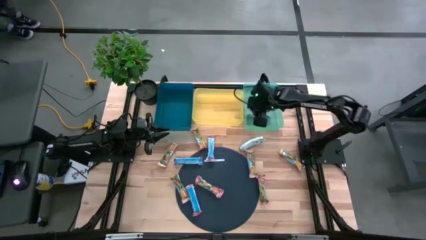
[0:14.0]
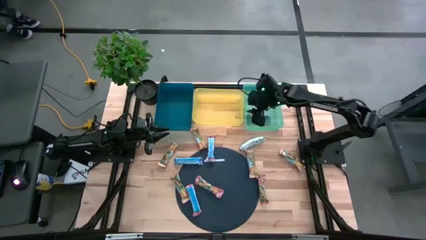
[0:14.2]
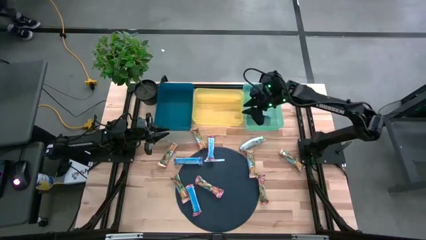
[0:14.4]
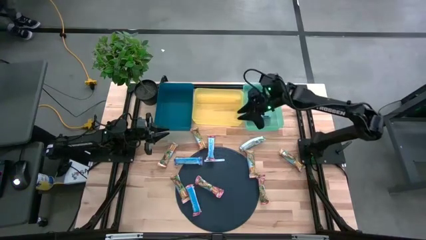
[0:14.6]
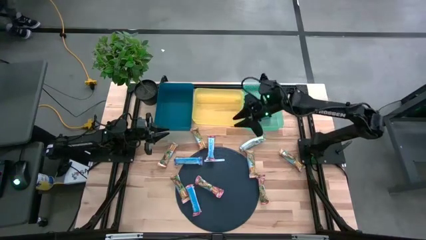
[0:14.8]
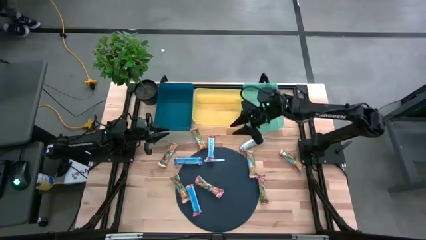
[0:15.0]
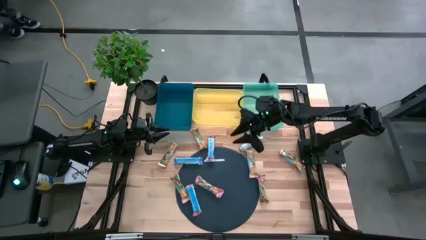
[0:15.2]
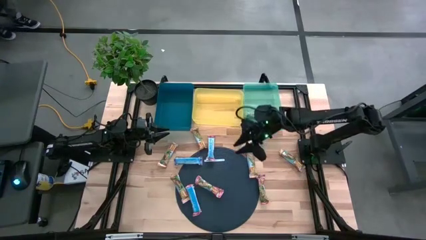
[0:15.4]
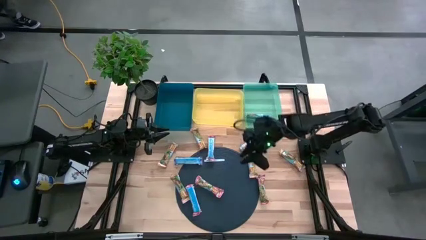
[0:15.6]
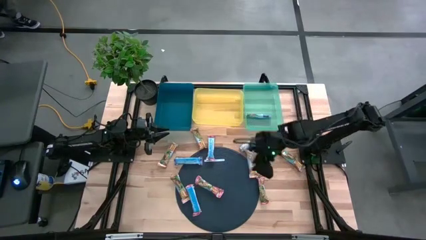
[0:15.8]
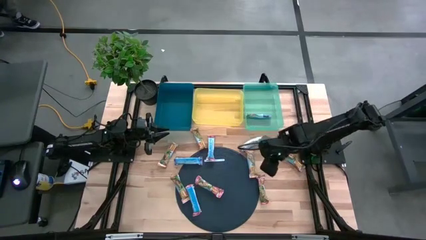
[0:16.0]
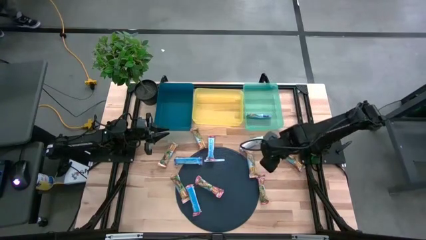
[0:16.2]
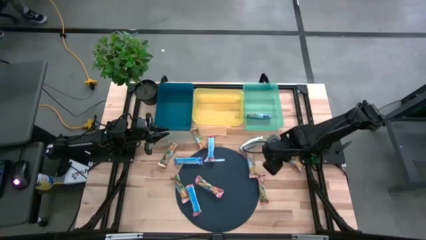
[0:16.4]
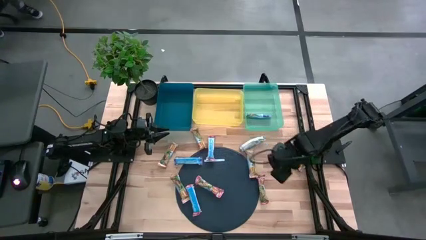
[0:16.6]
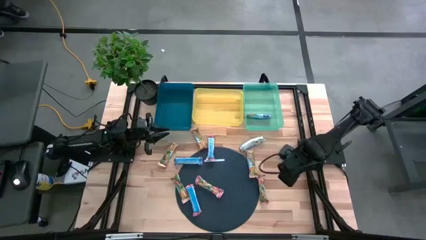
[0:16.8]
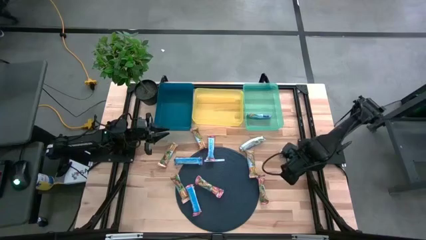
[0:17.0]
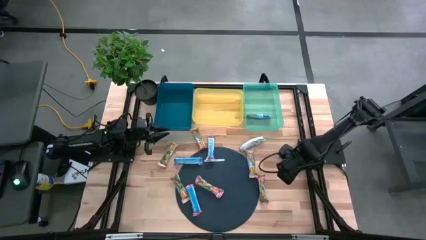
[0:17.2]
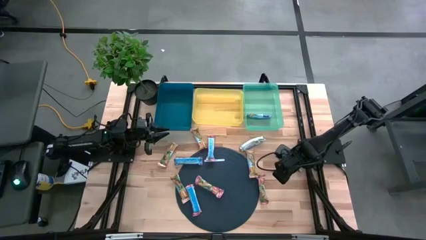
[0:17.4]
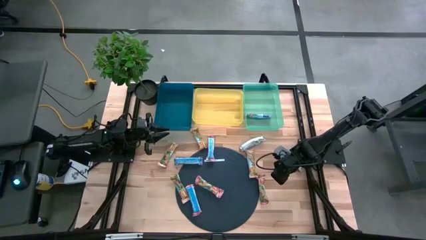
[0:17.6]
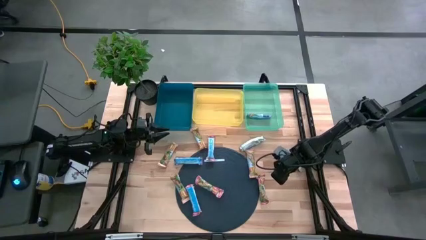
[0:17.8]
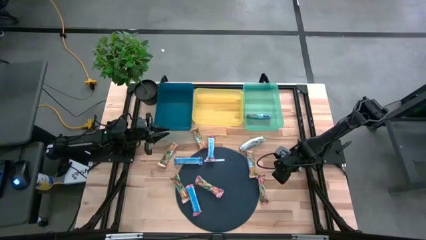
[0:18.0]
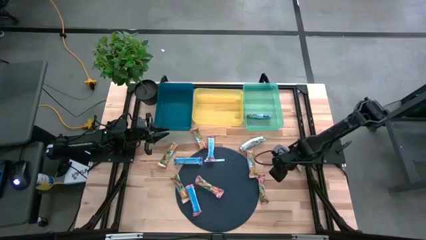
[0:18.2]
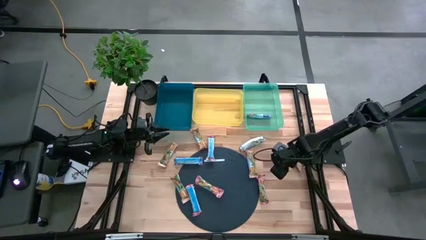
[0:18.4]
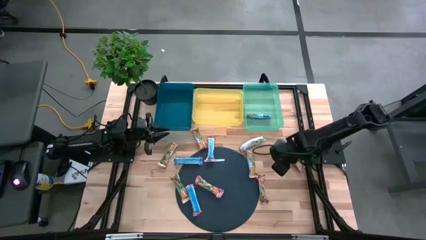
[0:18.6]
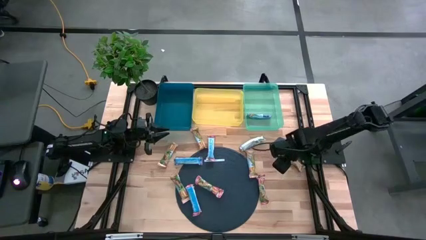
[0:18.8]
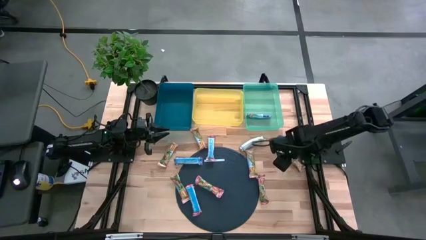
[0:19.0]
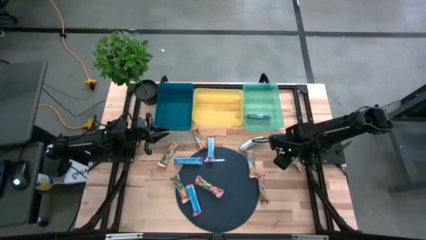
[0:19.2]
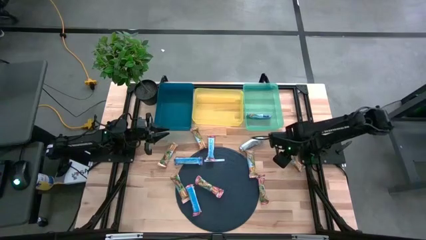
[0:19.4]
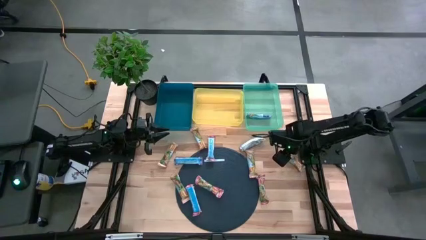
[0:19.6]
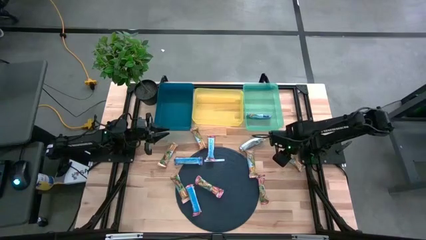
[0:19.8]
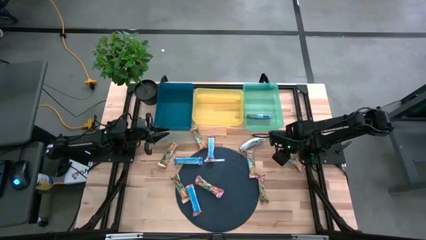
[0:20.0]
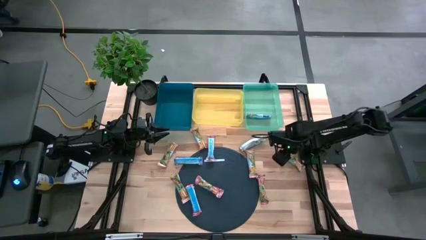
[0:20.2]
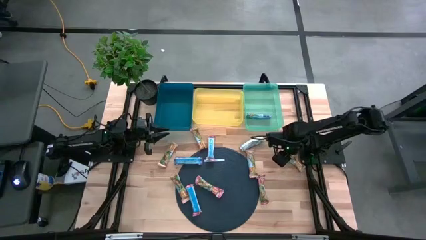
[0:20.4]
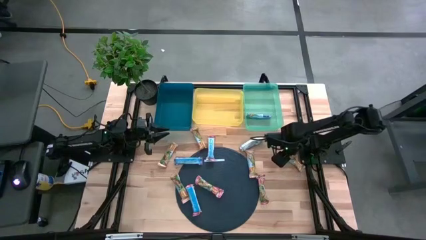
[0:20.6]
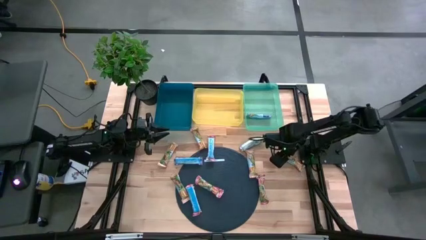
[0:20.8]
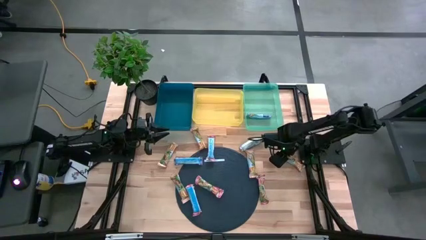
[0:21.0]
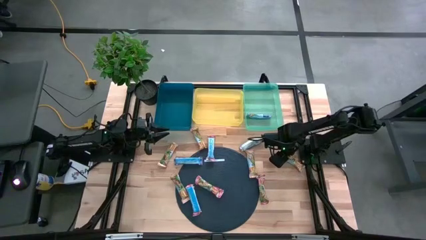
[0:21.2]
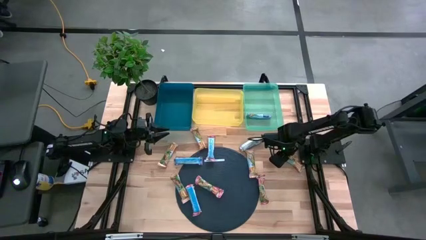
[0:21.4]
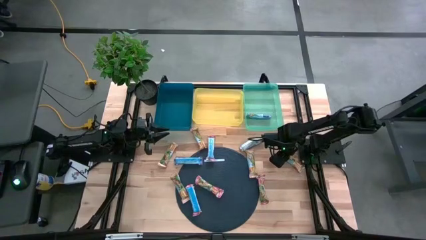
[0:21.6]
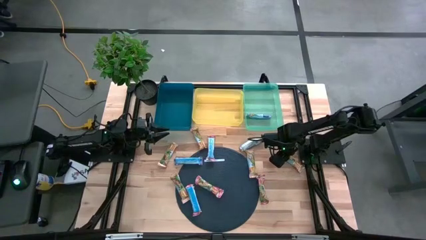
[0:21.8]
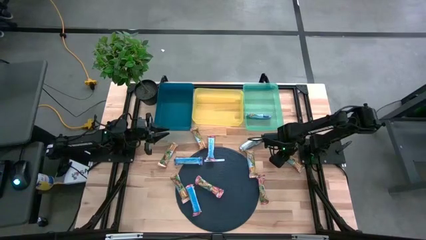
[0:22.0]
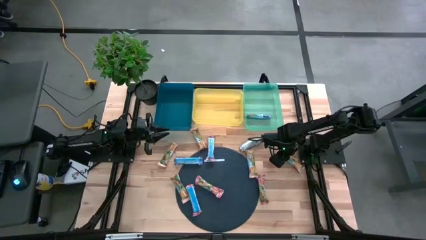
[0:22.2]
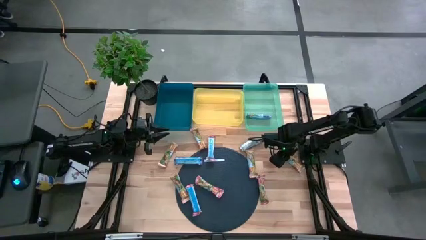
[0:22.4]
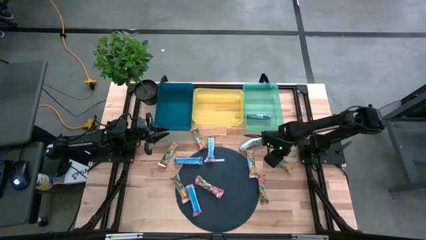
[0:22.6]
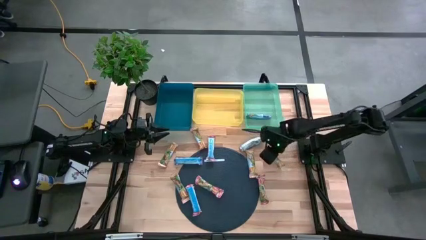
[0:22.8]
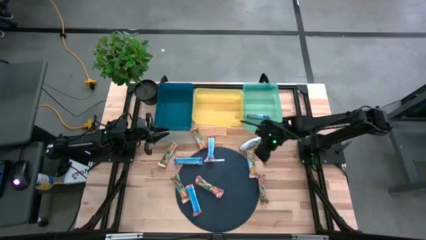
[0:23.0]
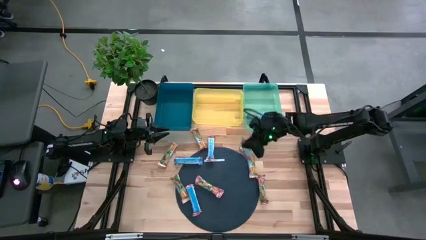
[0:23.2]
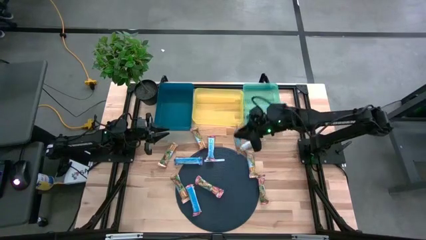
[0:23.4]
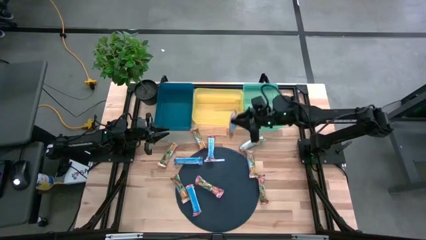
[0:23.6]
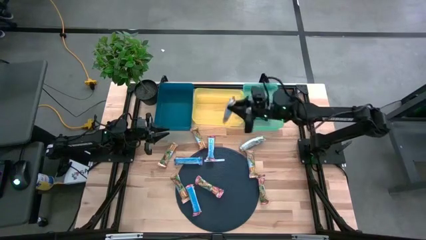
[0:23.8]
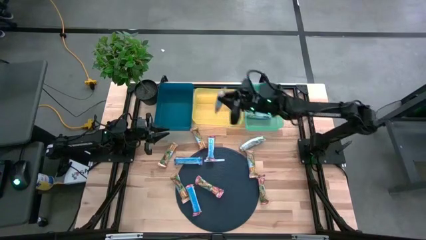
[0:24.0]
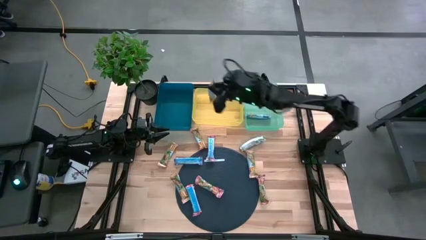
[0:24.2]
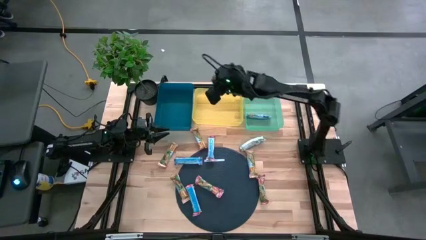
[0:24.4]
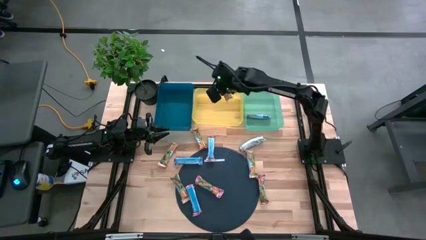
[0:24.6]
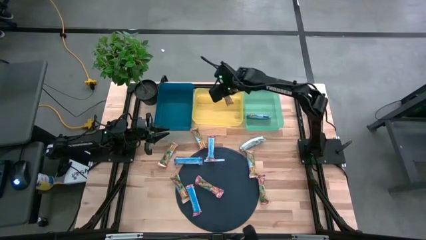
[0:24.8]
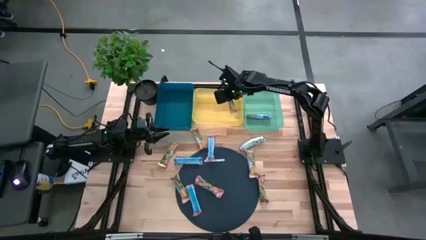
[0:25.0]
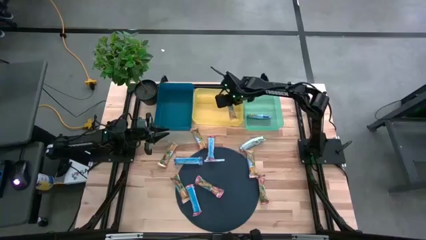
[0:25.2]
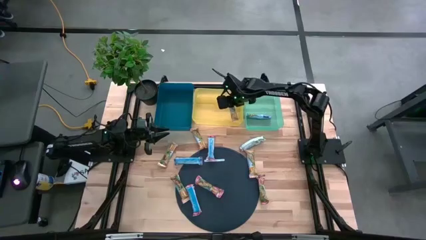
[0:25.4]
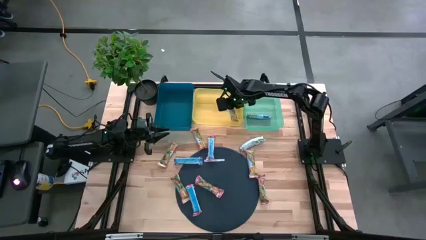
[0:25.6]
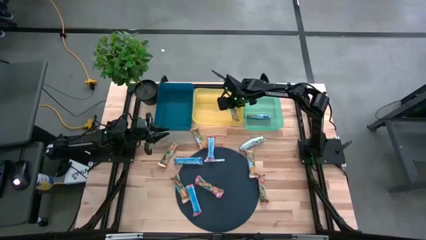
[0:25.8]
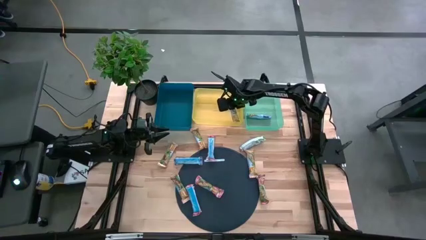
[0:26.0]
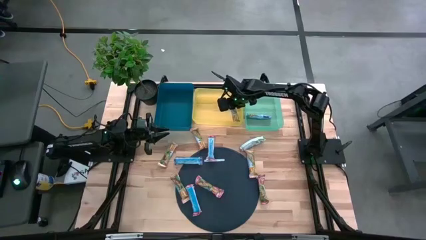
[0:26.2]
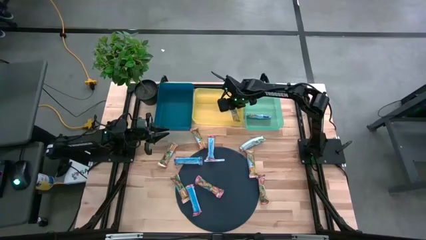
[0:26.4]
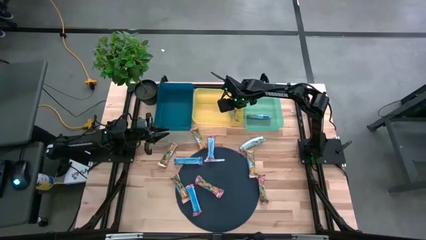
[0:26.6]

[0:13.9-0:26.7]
Task: Pick and place Granola Bars by type
Put the orange granola bar into the yellow bin

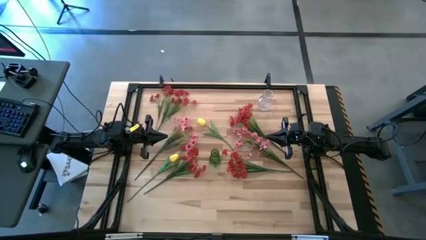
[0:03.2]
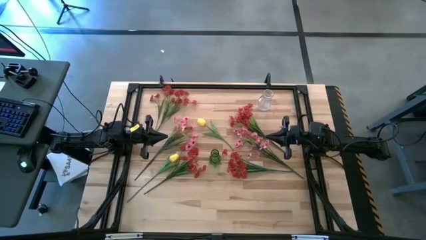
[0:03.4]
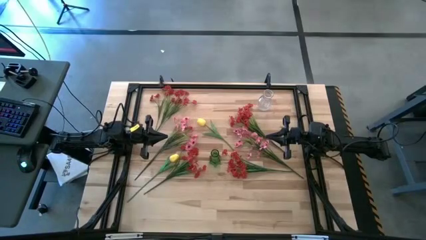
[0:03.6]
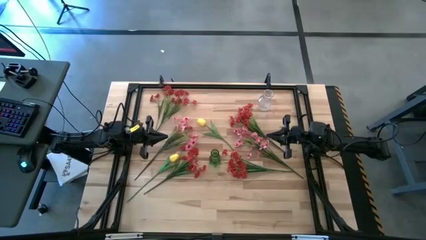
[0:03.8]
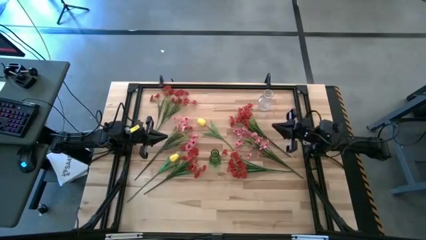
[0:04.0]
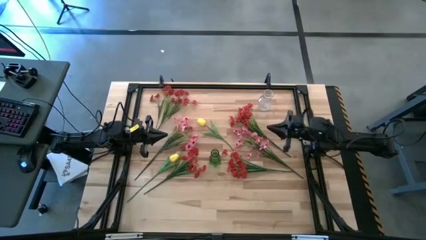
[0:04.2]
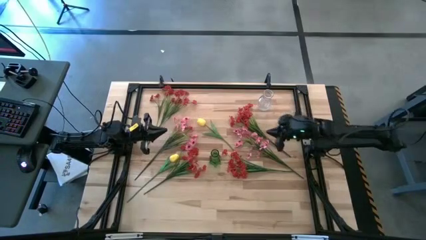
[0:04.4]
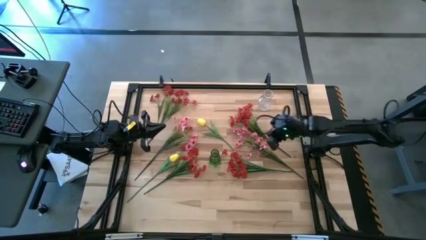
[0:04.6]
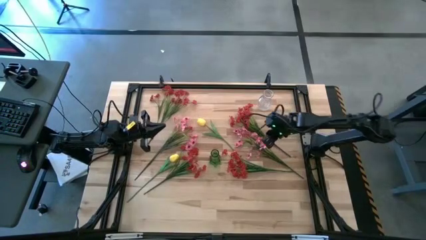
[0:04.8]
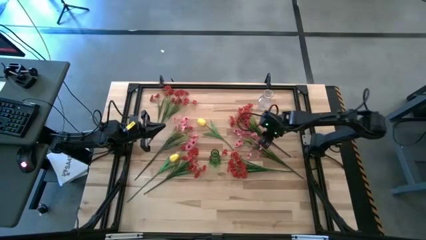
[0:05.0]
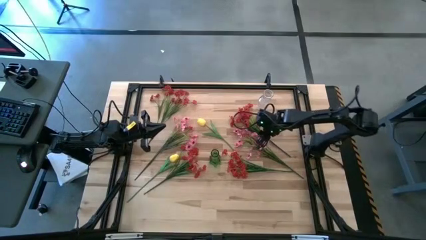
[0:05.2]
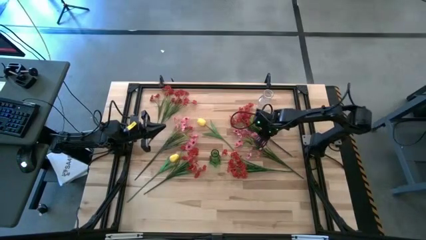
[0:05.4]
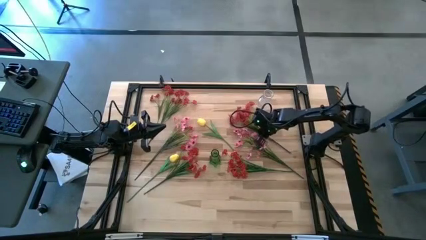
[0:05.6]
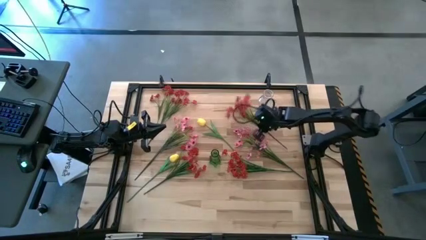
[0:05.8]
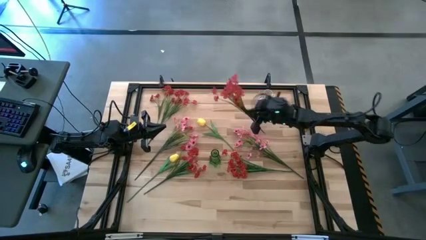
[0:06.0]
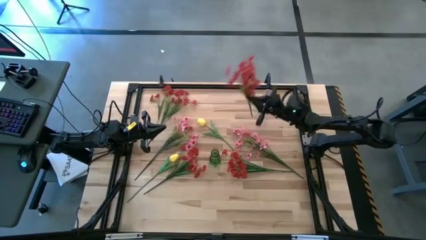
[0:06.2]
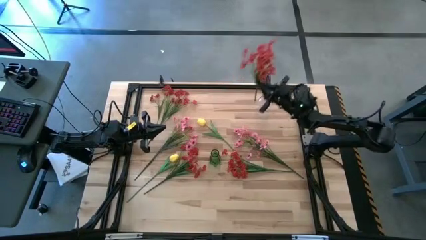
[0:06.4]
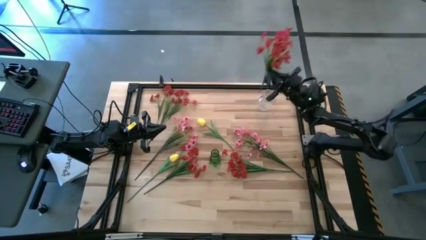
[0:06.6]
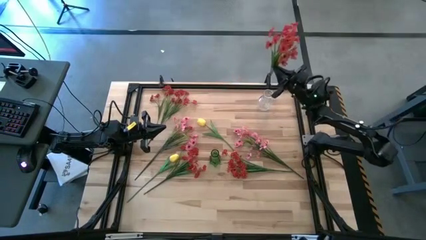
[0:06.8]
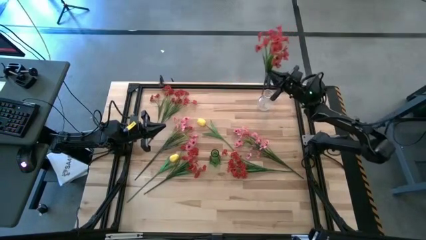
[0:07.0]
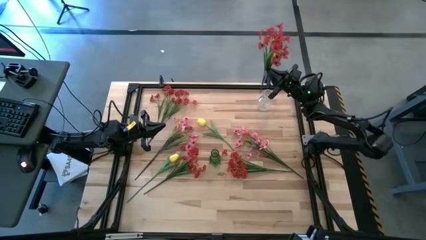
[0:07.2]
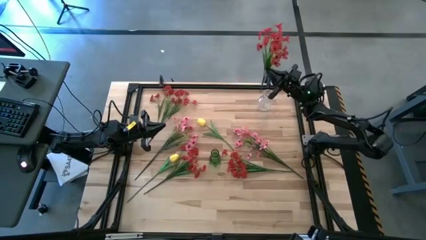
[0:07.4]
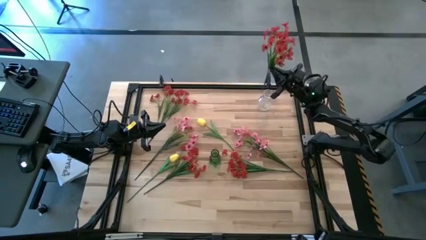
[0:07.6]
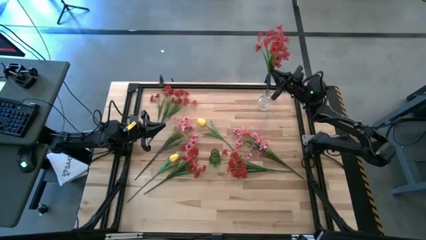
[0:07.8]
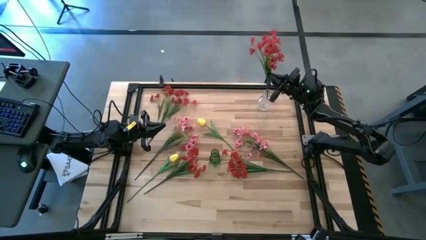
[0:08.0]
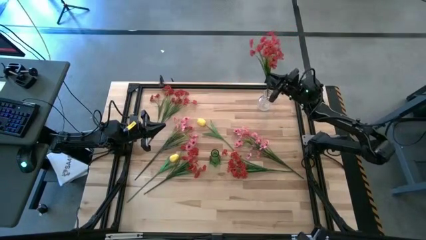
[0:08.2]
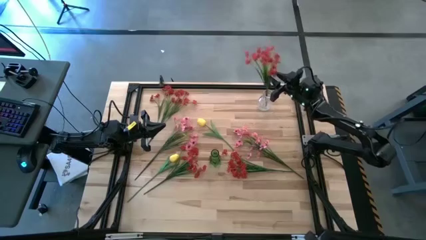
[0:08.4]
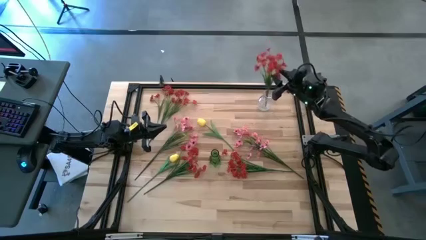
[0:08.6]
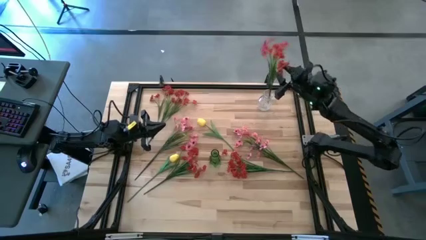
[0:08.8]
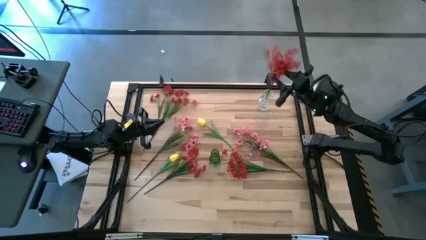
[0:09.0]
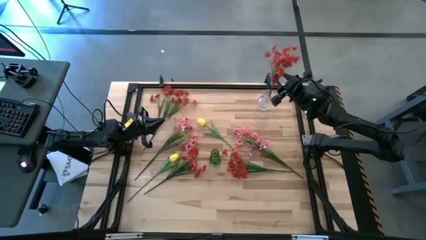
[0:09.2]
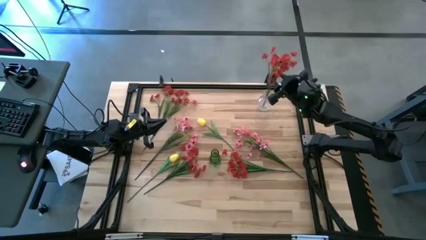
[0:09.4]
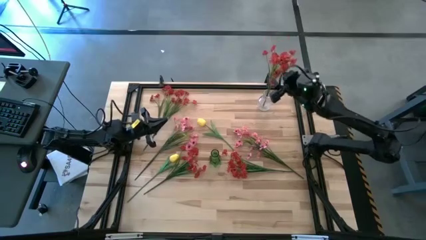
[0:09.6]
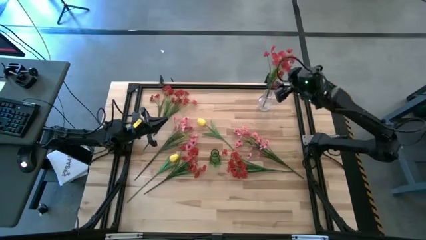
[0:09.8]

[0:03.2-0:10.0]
Task: Sort flowers into vase by color
Put the top right red flowers into the transparent vase
